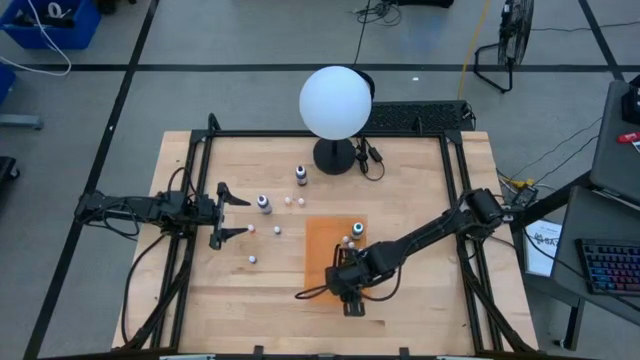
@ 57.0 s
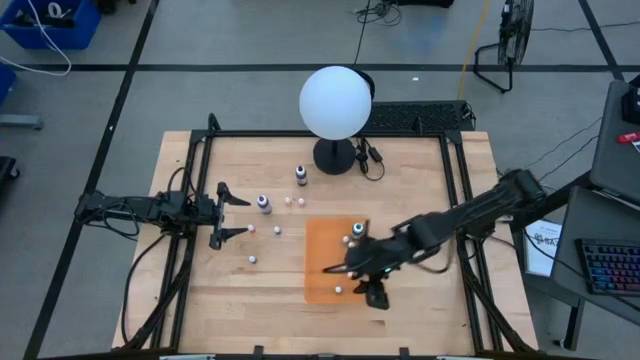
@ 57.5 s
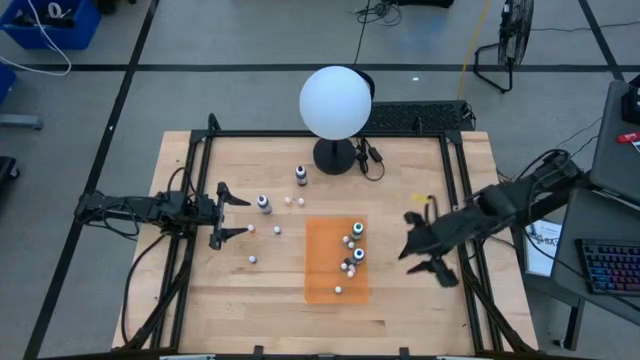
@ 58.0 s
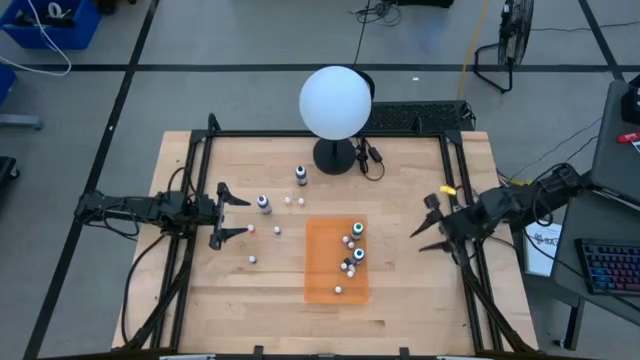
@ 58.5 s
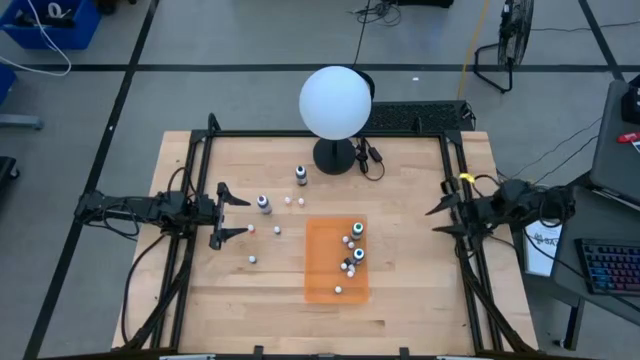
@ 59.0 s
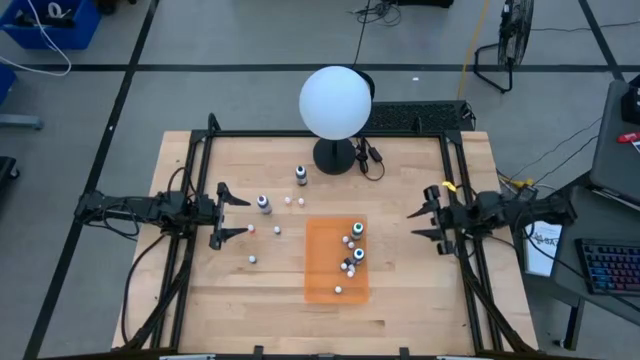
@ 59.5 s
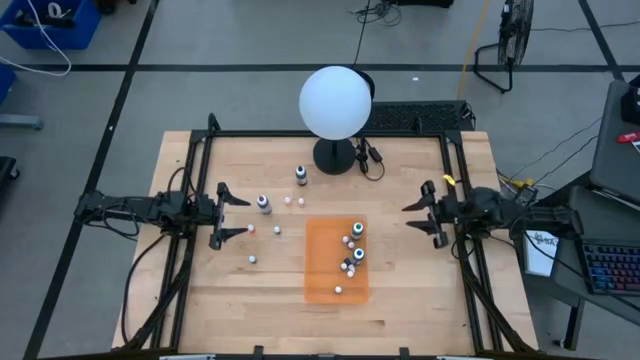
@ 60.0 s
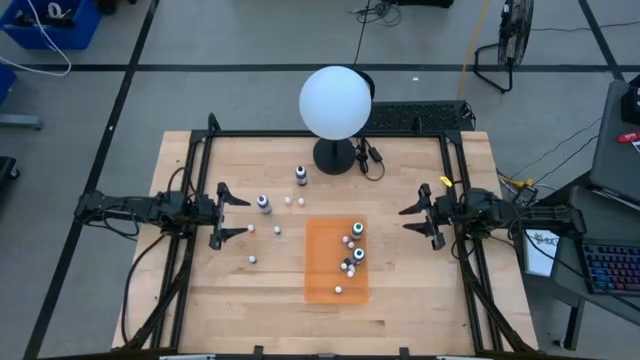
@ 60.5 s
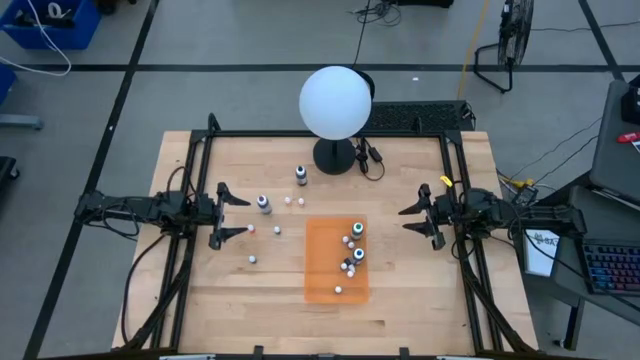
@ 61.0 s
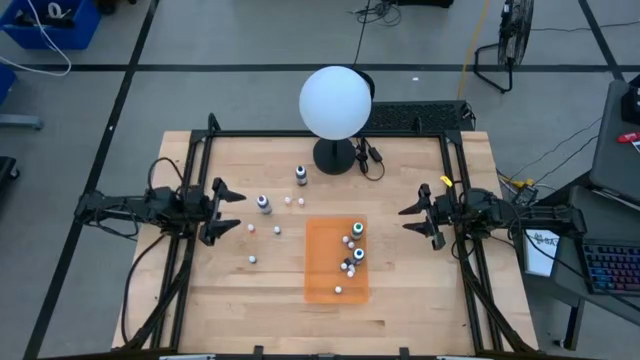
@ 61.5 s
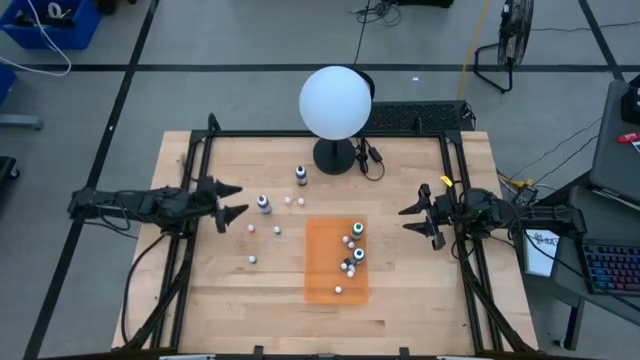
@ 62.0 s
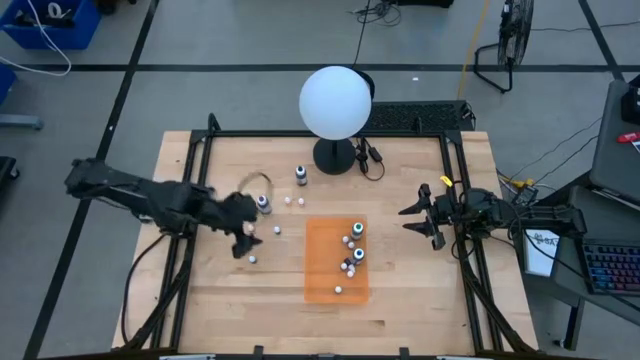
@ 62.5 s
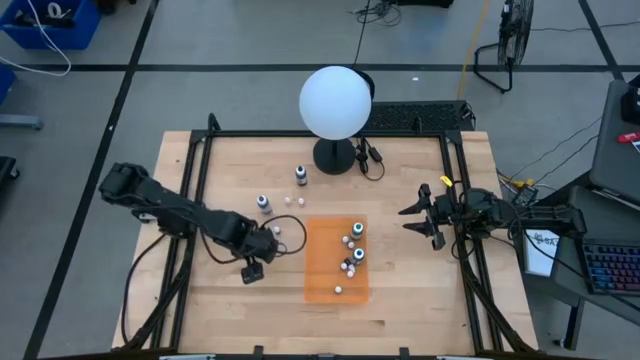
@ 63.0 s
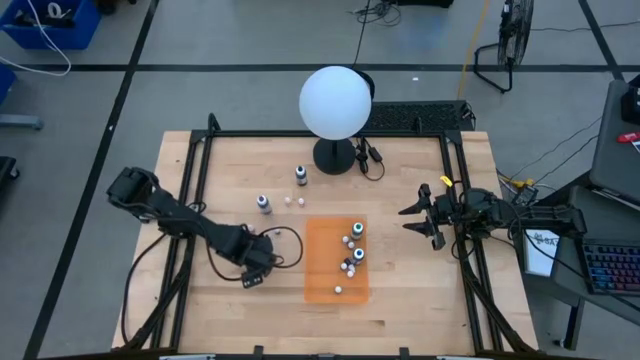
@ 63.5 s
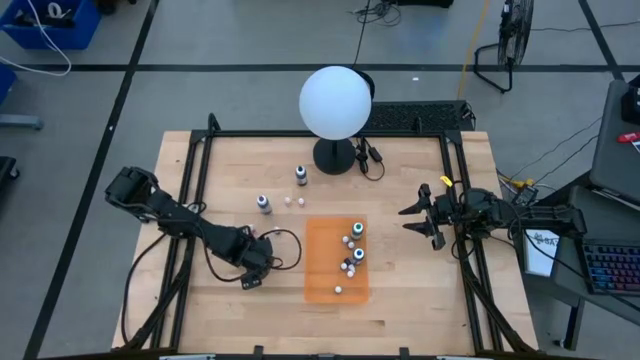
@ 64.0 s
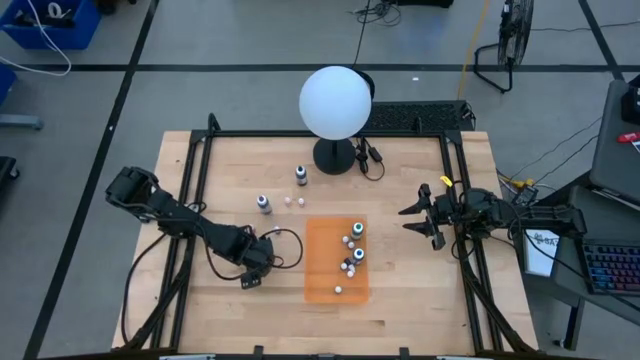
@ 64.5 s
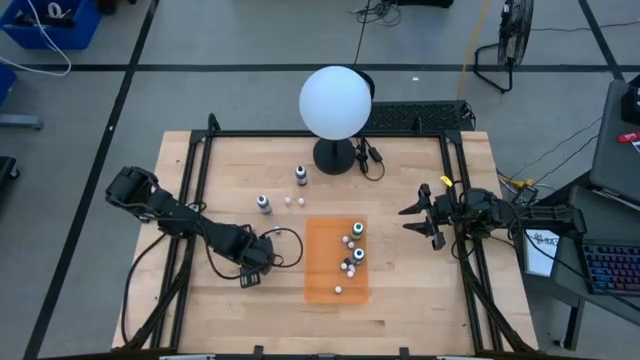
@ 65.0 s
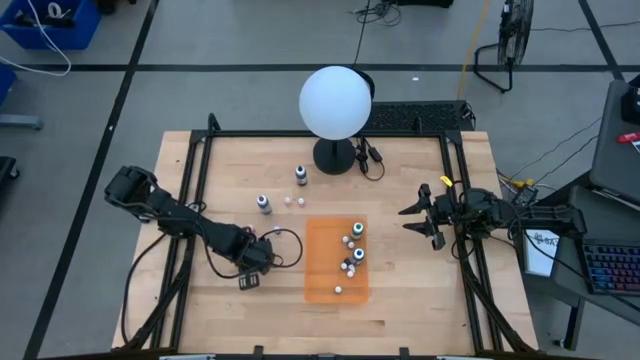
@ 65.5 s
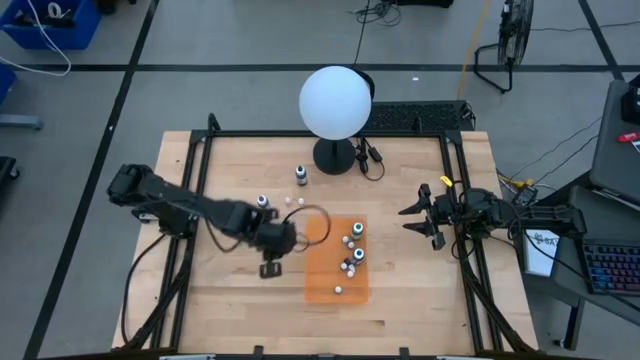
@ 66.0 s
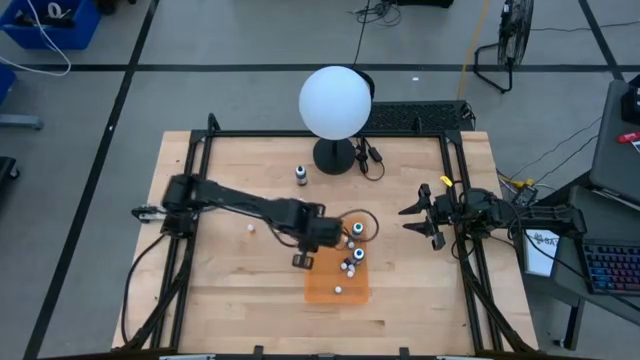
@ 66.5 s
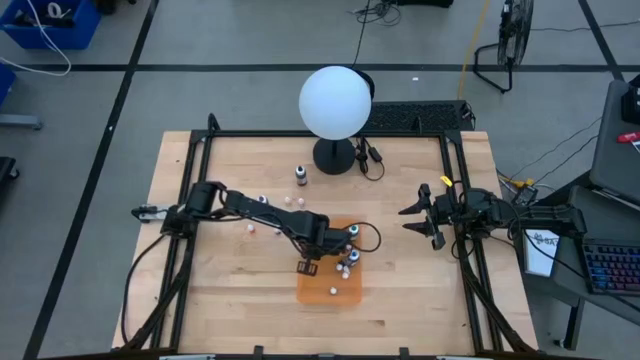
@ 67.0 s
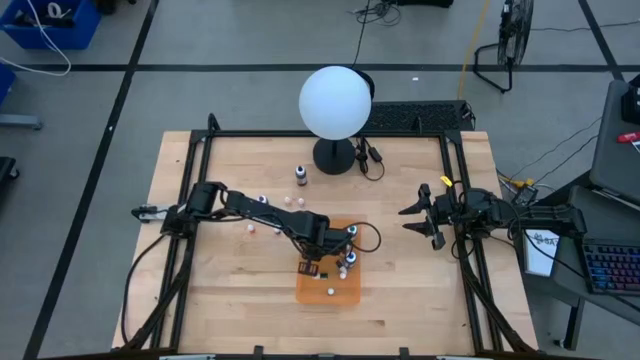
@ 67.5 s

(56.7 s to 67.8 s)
Task: Pick & Place food coloring
Put the small blue food coloring bottle into the orange bin

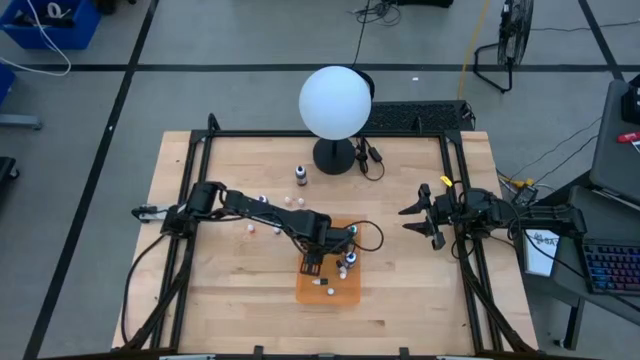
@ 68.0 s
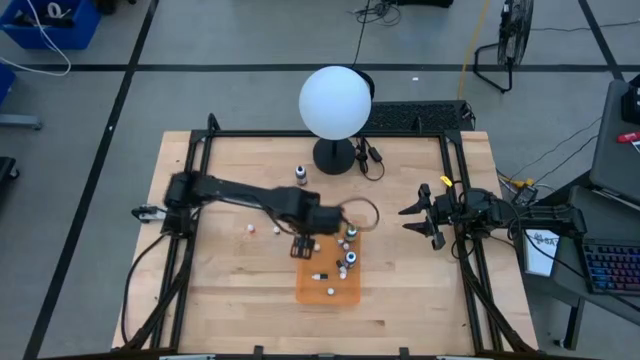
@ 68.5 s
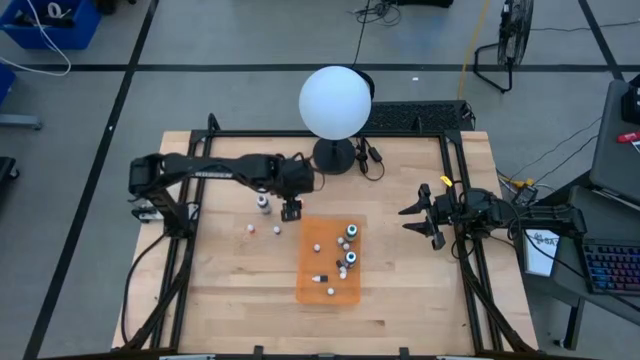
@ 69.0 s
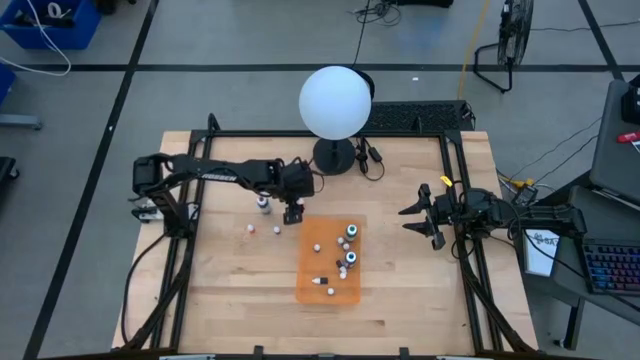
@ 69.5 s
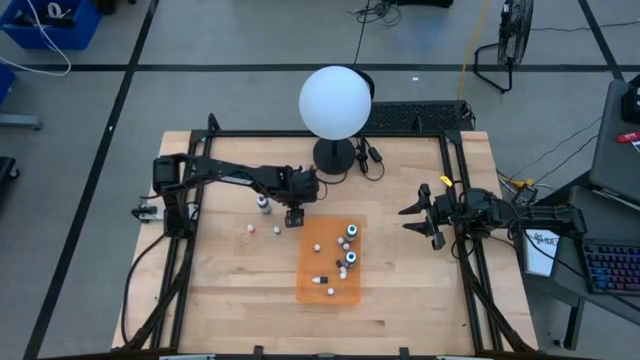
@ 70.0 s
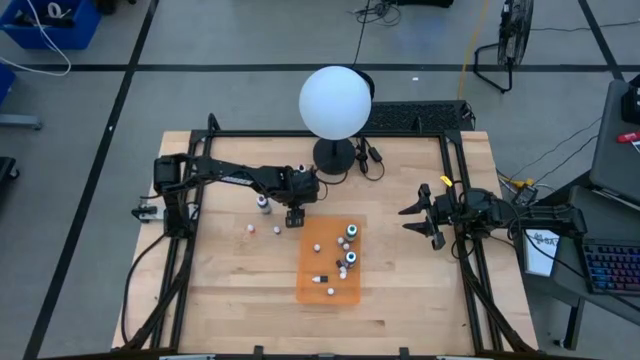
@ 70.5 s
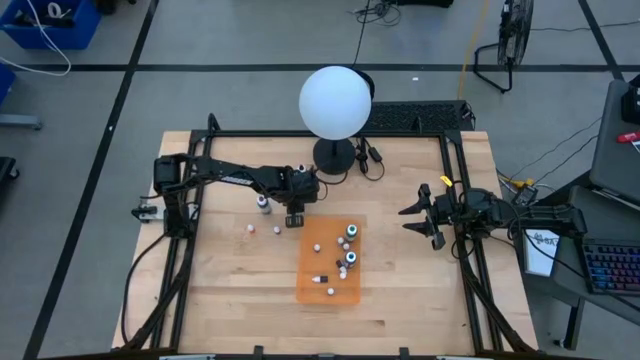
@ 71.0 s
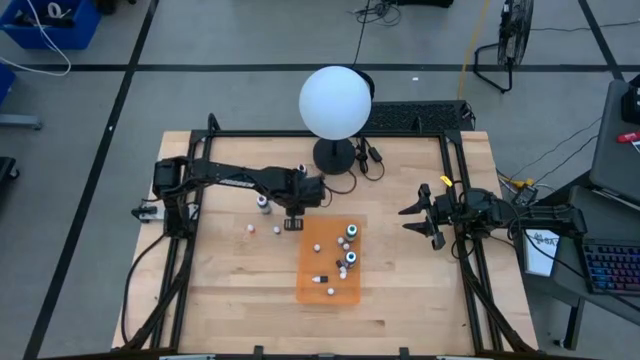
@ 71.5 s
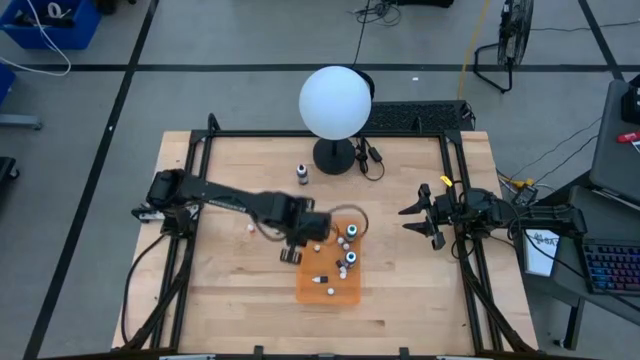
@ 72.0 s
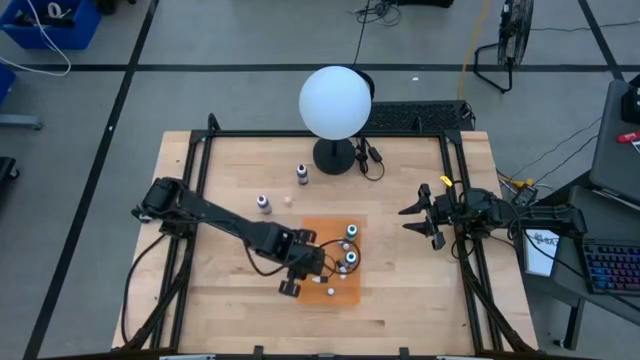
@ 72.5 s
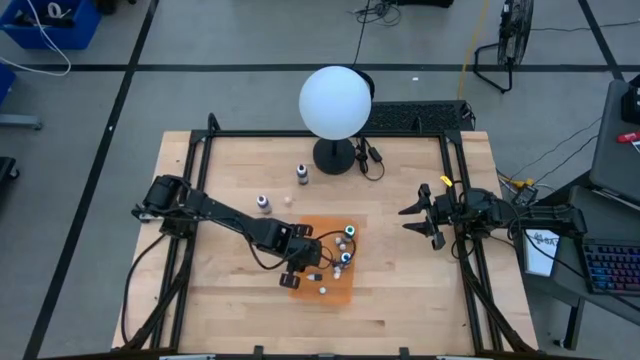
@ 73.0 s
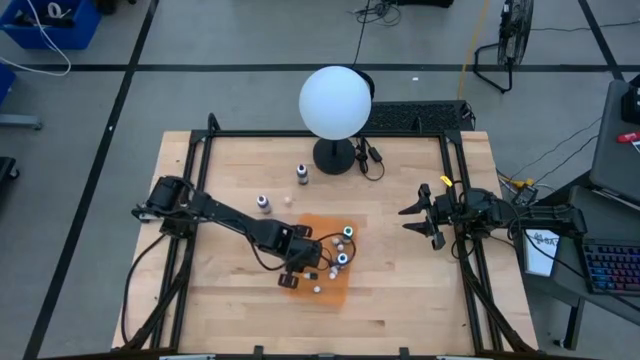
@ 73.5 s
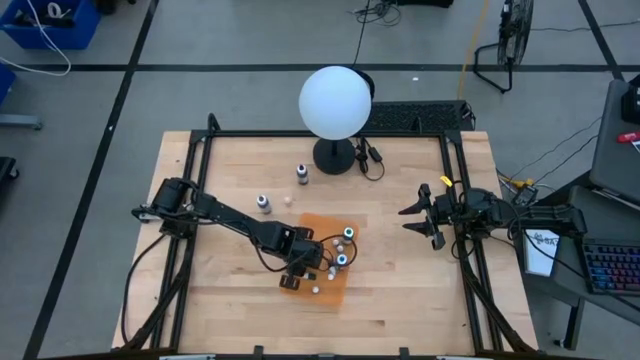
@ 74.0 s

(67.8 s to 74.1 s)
Put the small orange food coloring bottle into the orange bin

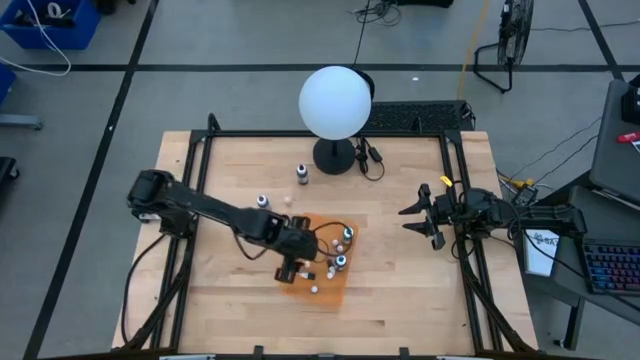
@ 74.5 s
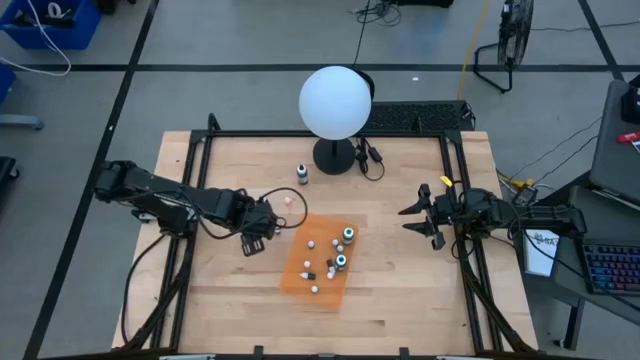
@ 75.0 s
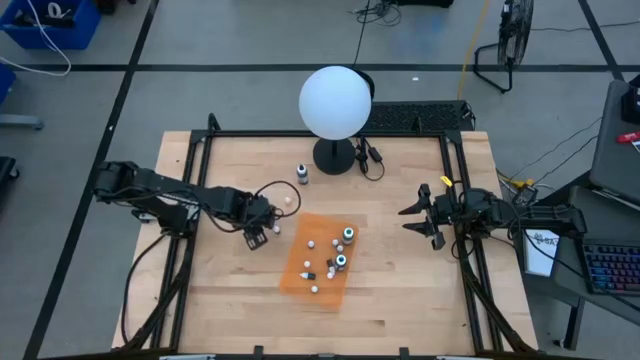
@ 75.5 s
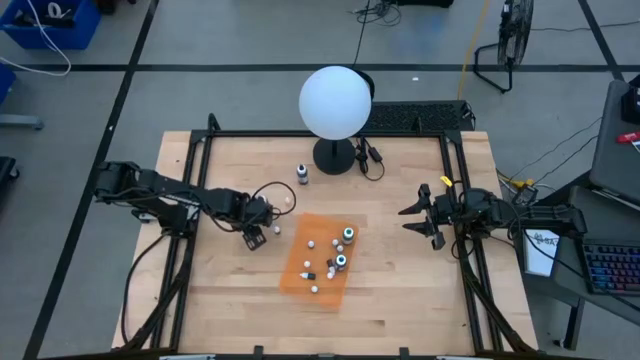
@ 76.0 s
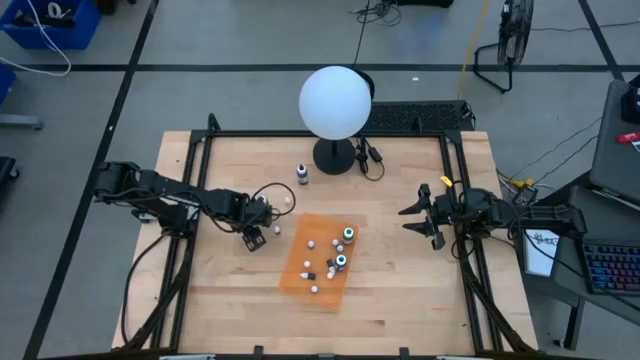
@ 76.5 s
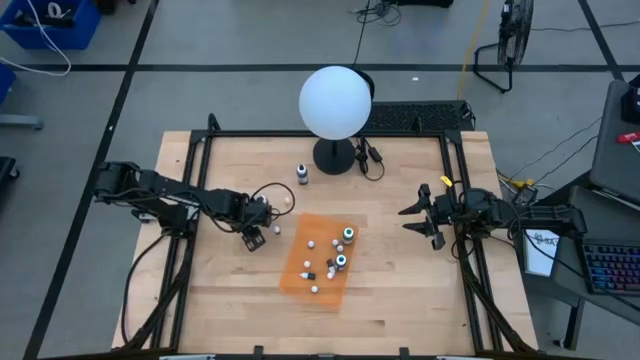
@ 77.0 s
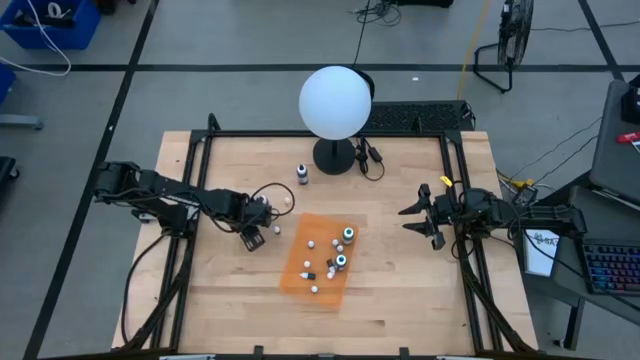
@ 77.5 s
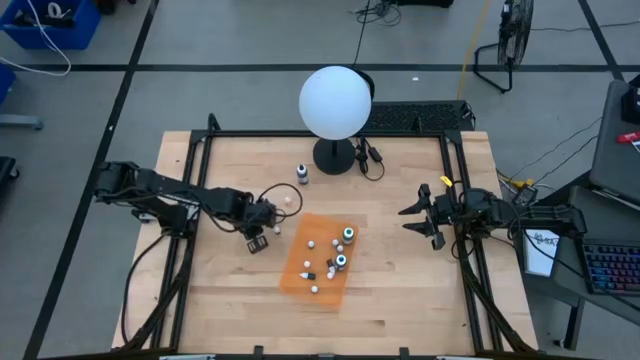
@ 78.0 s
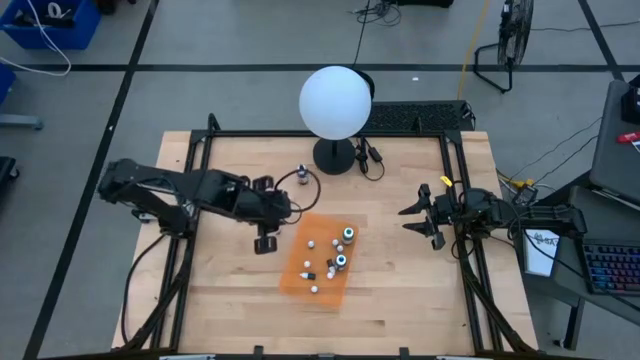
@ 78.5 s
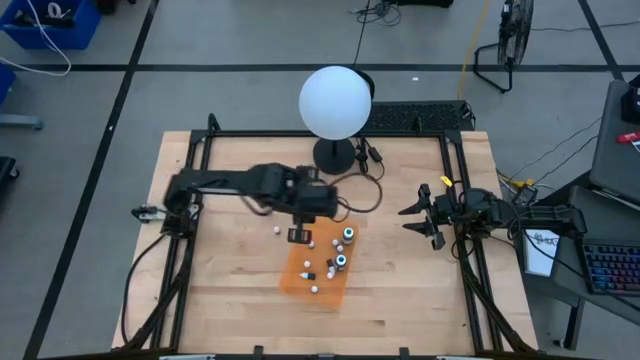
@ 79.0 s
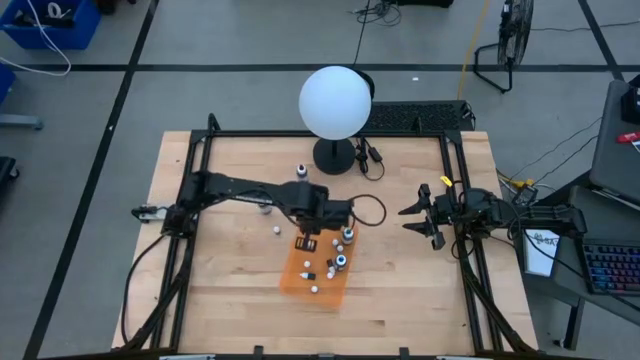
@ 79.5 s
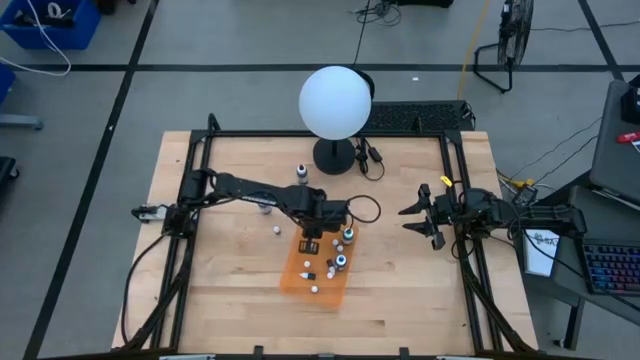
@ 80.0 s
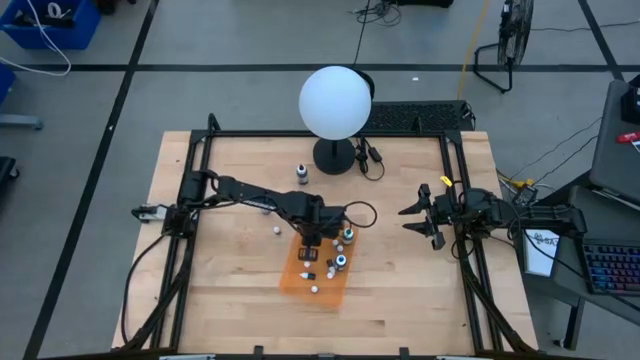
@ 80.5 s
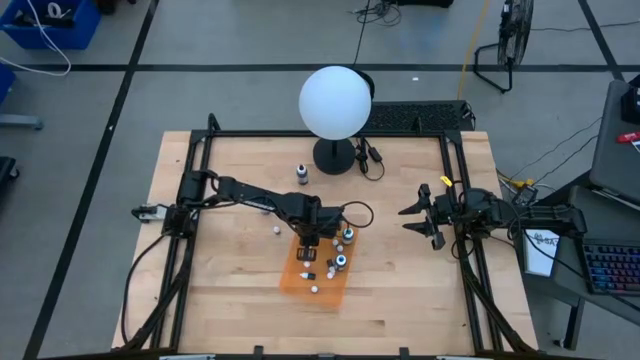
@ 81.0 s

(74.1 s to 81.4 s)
Put the small orange food coloring bottle into the orange bin
